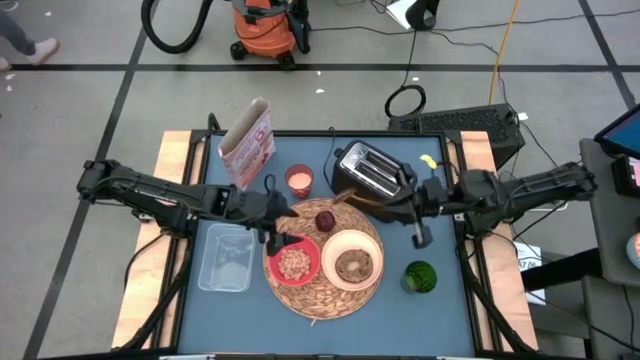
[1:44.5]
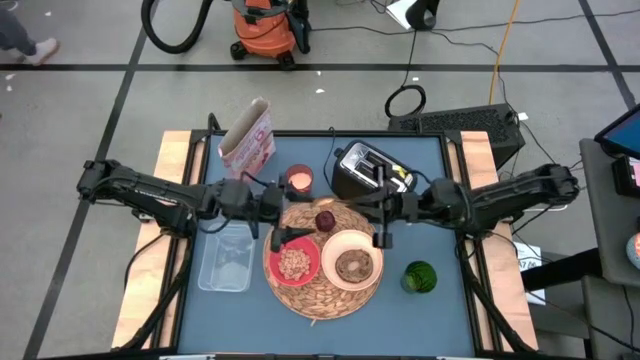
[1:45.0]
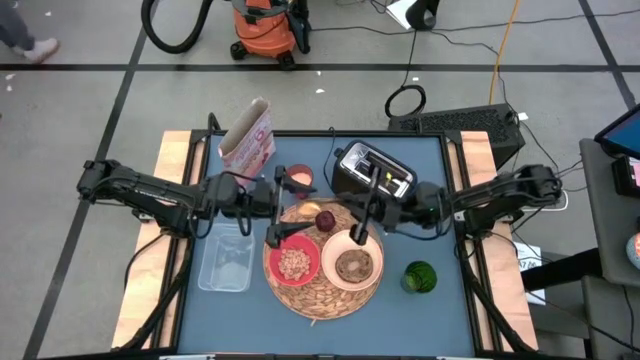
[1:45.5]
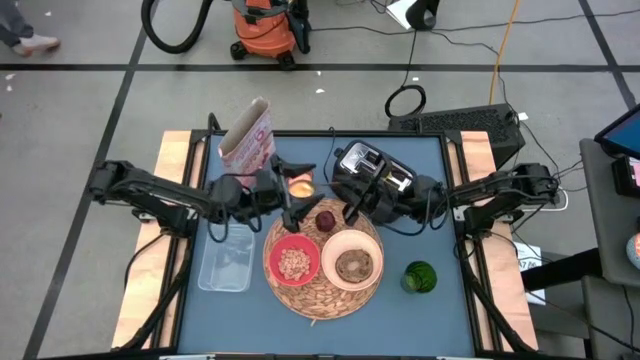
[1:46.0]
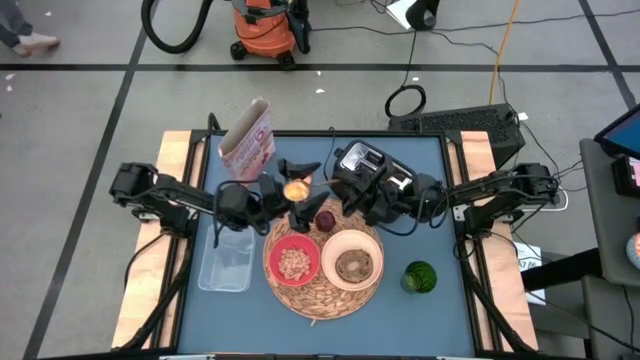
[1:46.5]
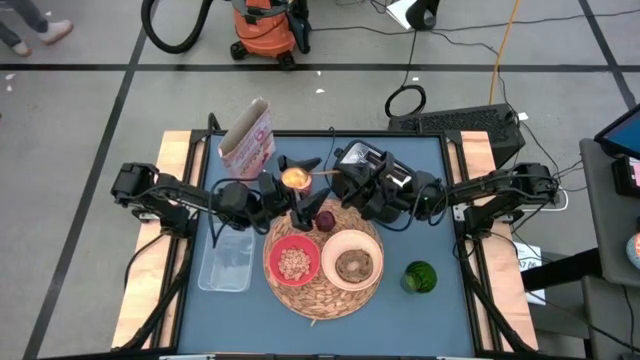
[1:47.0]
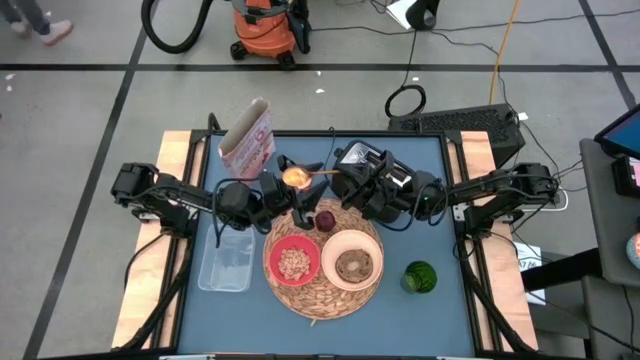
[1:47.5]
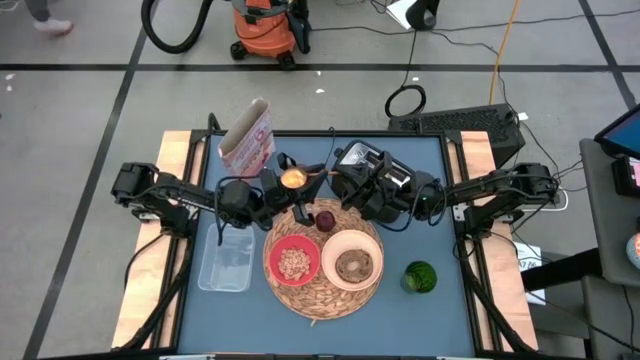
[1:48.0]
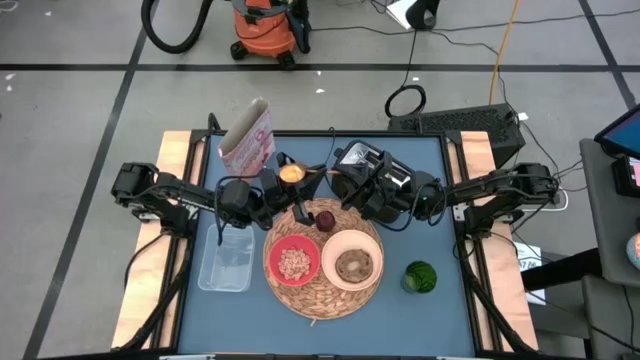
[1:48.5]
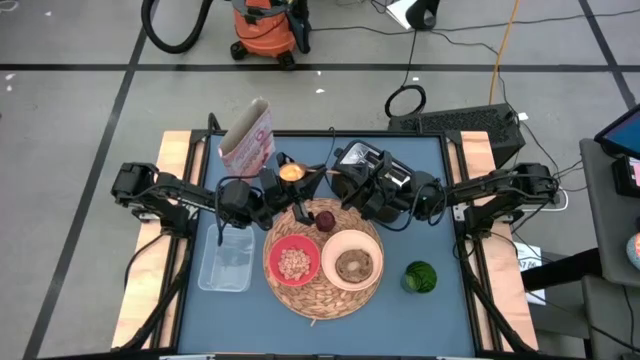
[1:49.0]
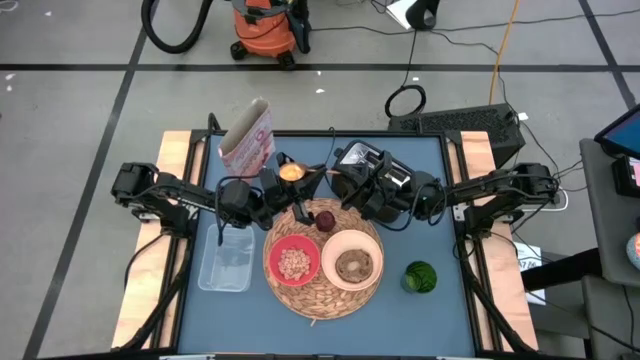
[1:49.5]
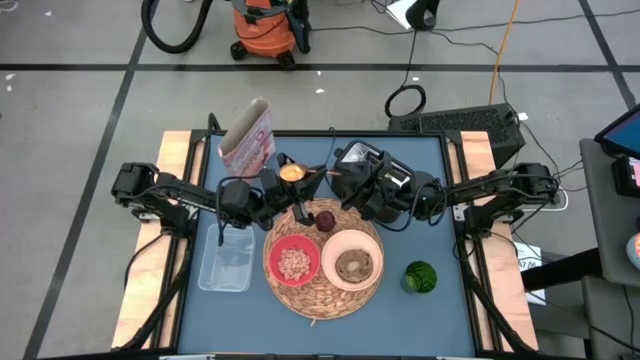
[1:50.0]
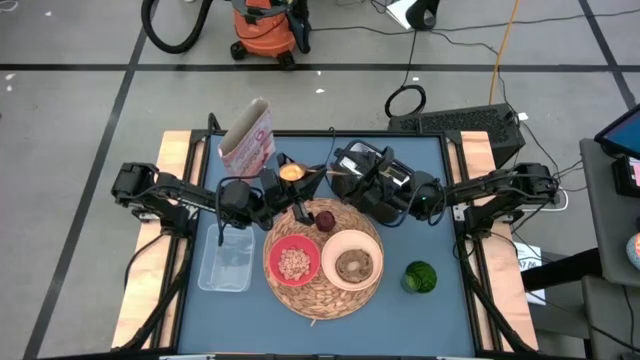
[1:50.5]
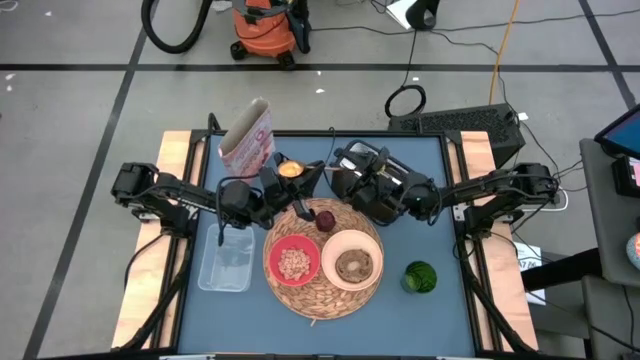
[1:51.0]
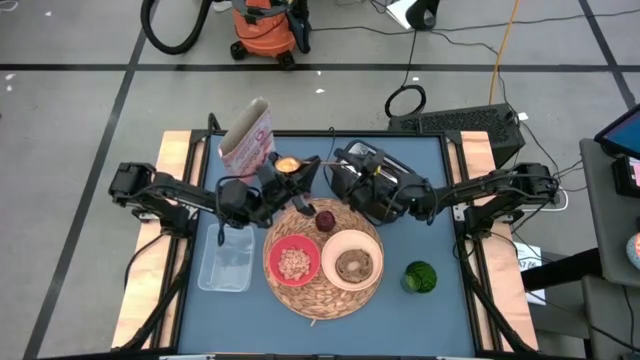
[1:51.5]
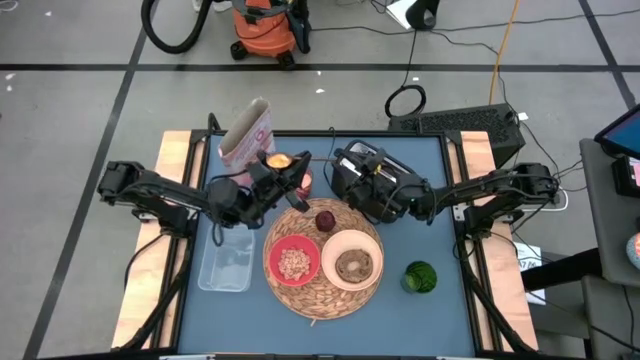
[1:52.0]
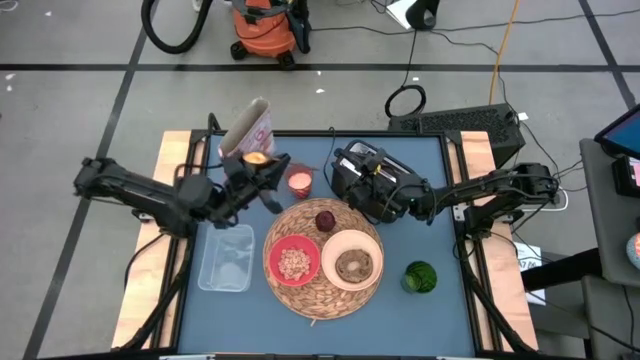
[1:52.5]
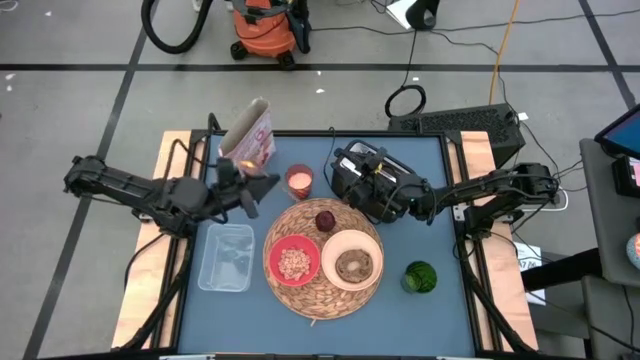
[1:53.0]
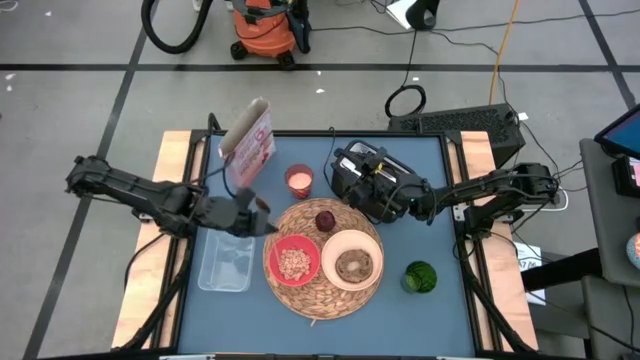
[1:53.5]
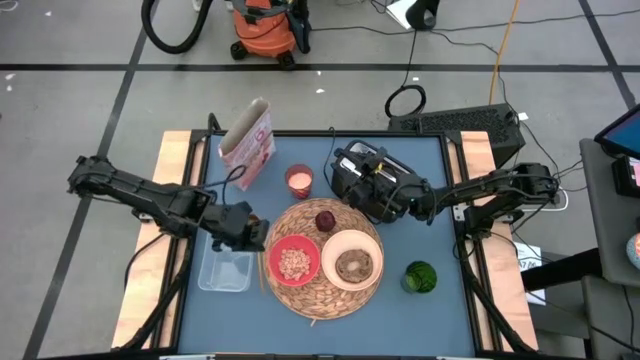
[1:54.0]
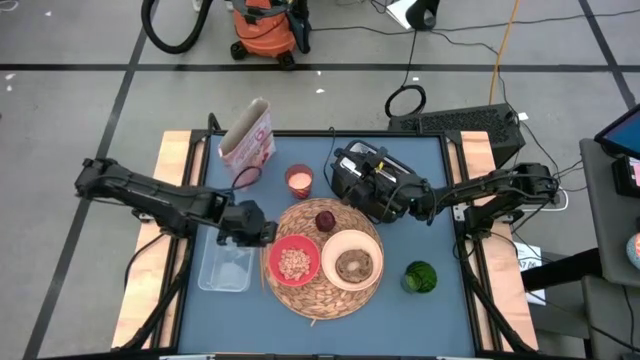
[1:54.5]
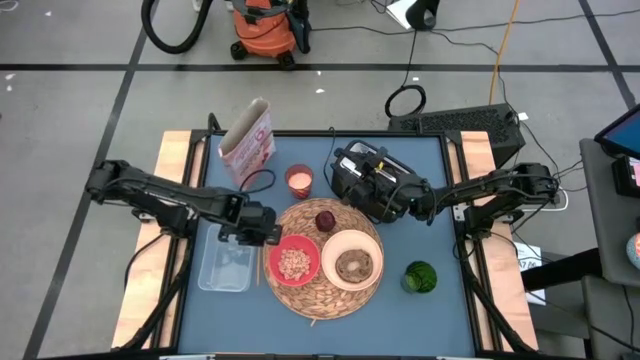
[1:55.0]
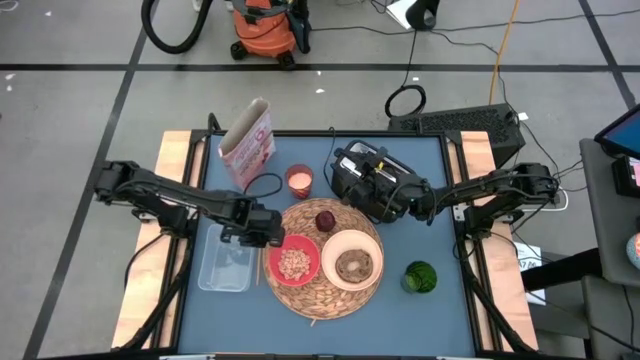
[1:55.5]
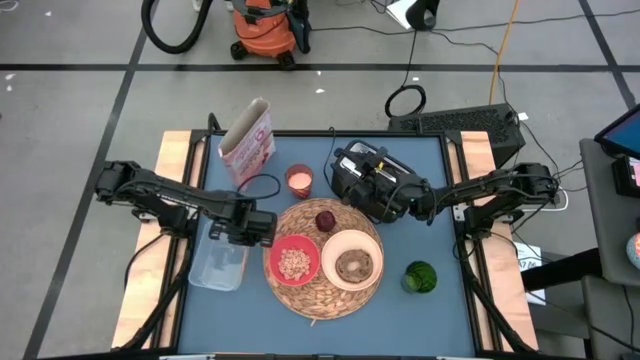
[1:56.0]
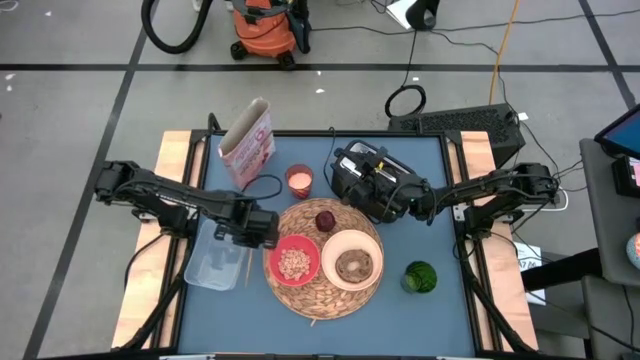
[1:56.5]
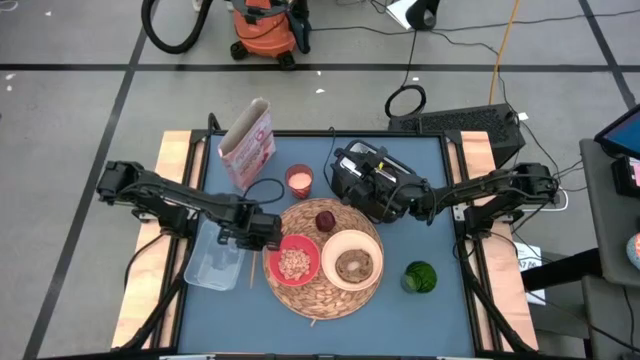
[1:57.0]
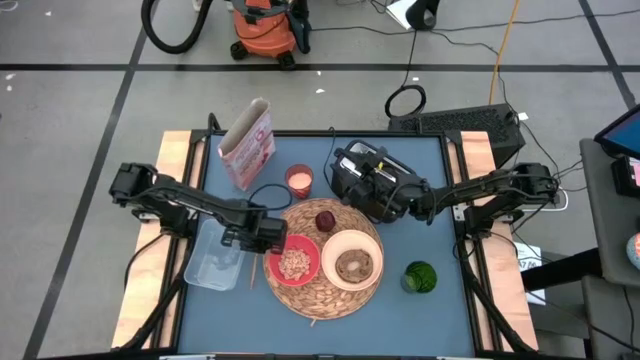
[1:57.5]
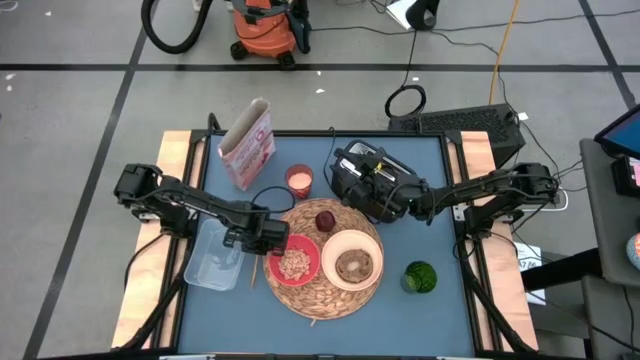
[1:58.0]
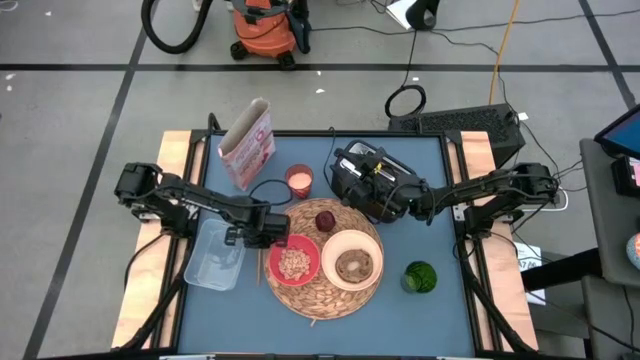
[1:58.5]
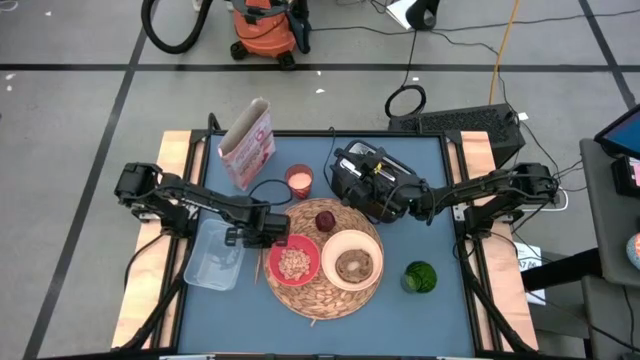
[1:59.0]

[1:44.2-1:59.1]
Task: Arrange a breakfast setting
Put the gold spoon from the green cup to the left side of the placemat
